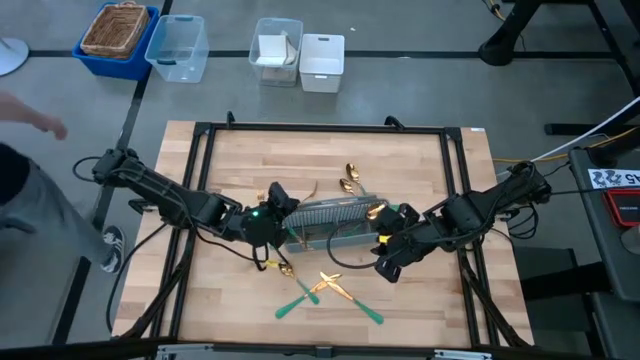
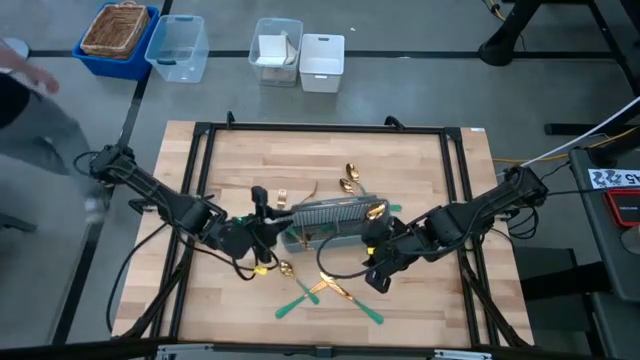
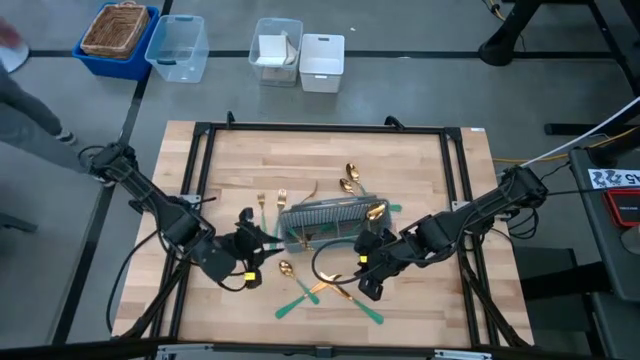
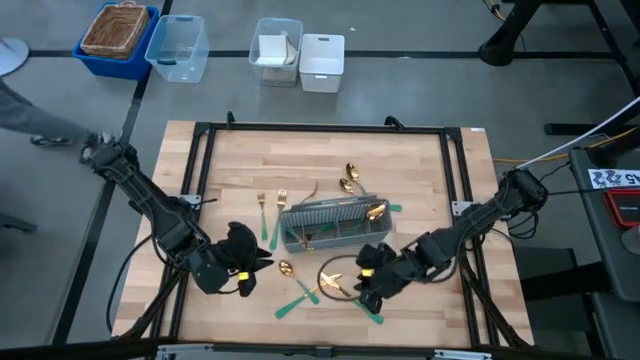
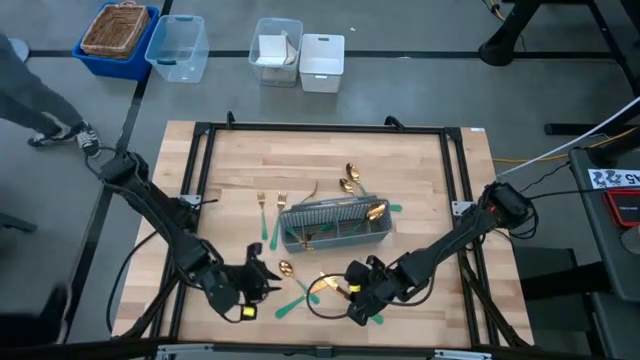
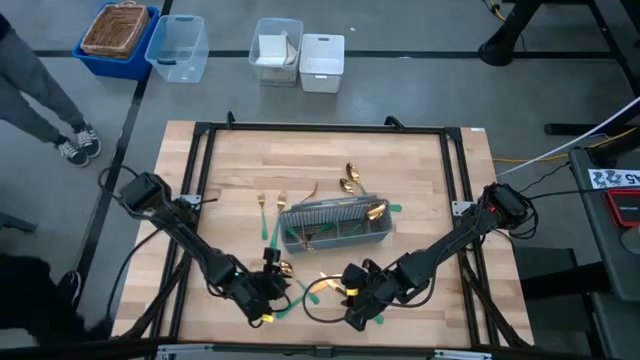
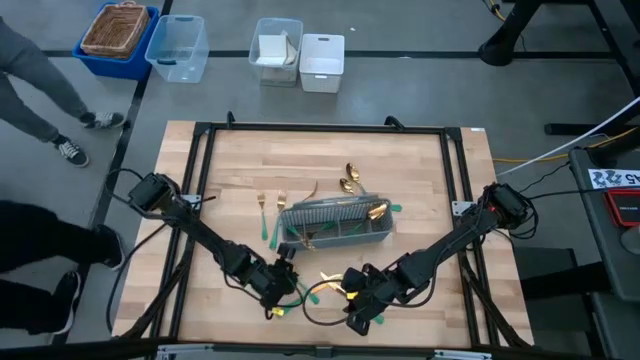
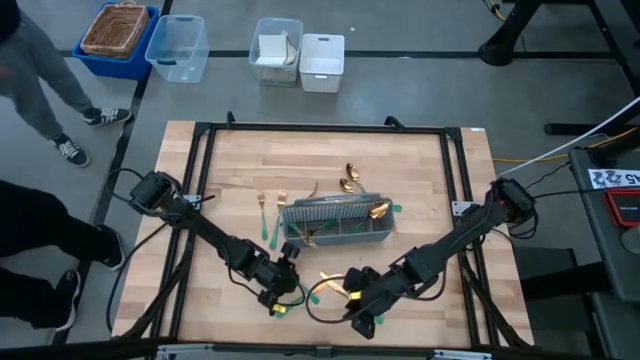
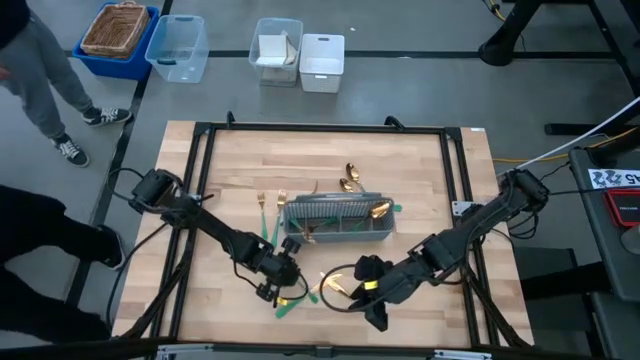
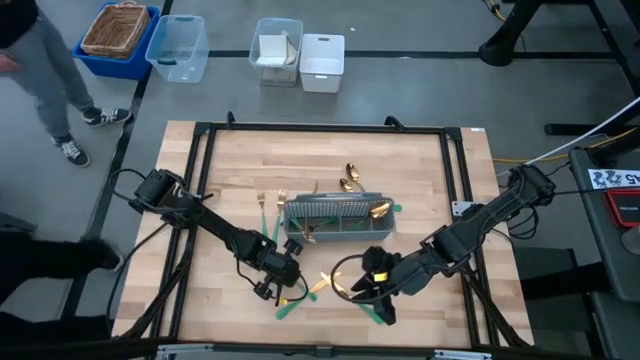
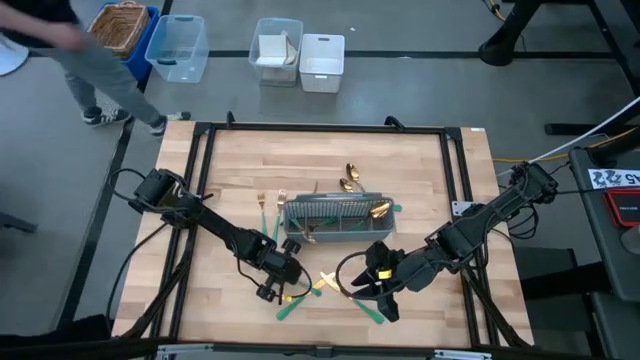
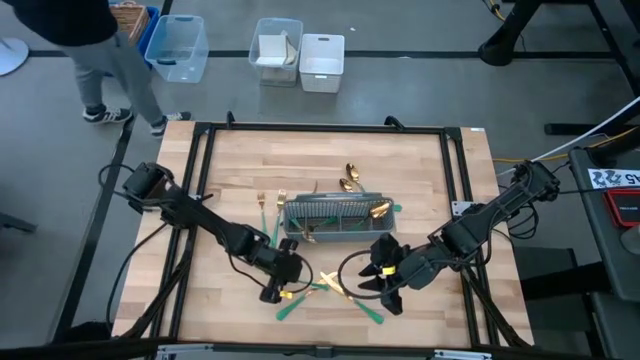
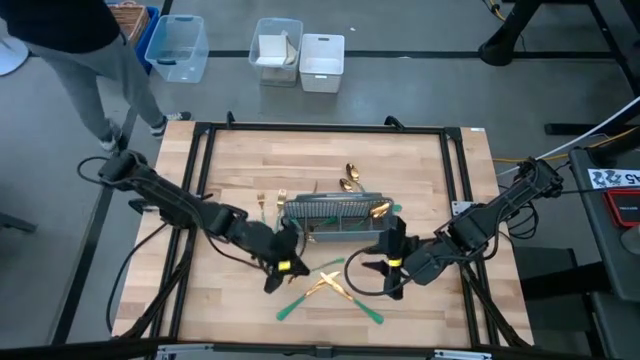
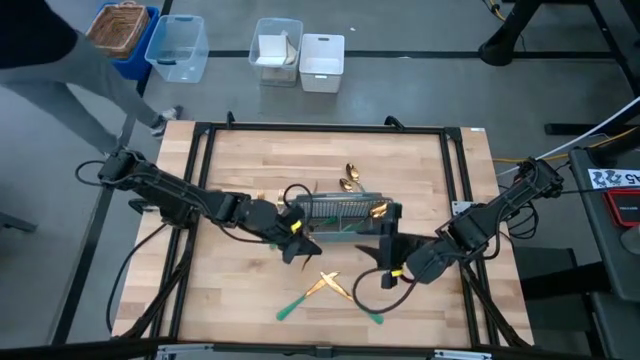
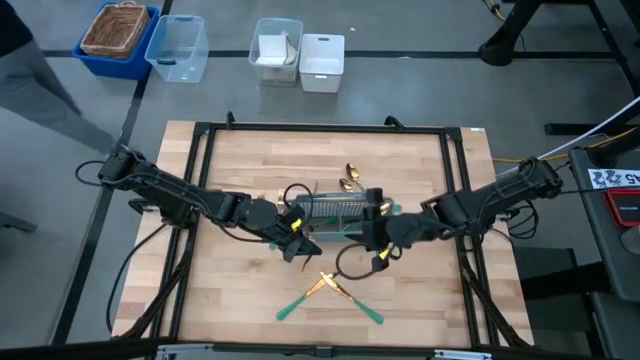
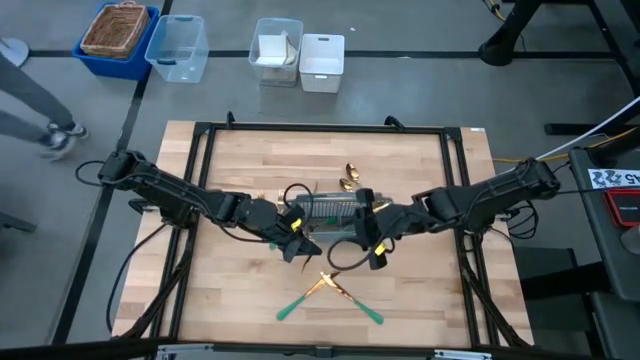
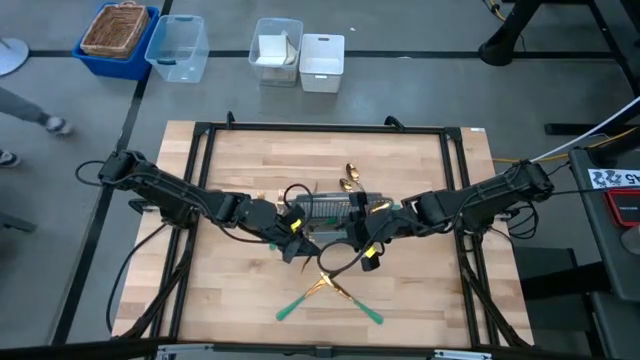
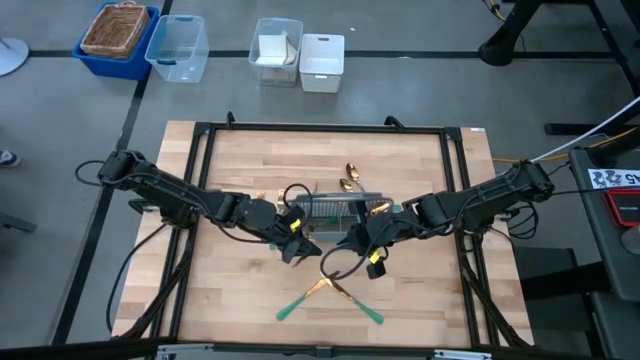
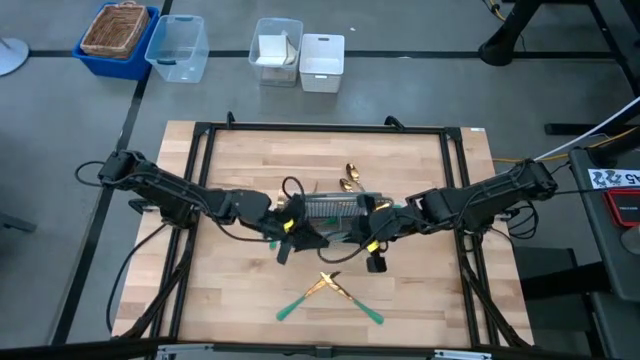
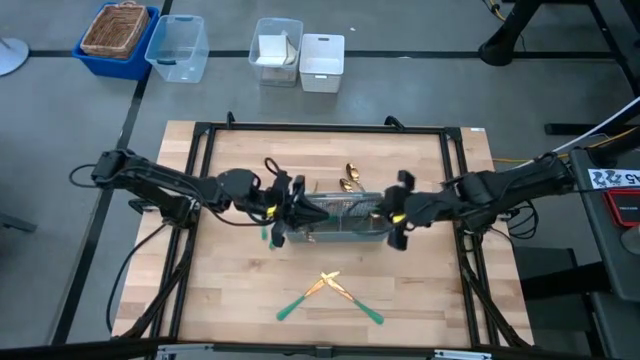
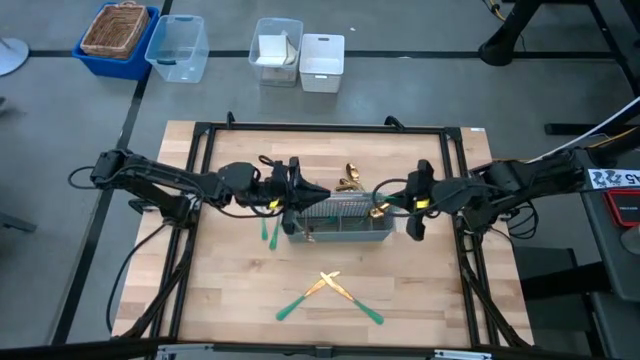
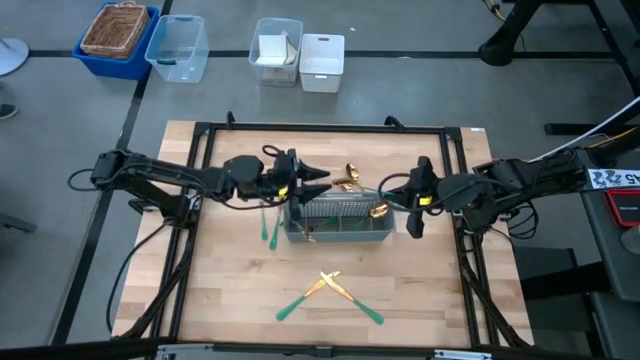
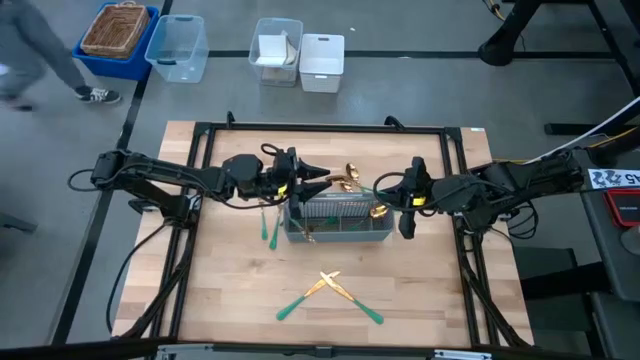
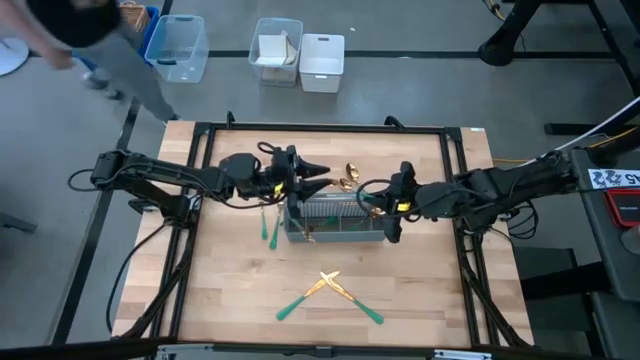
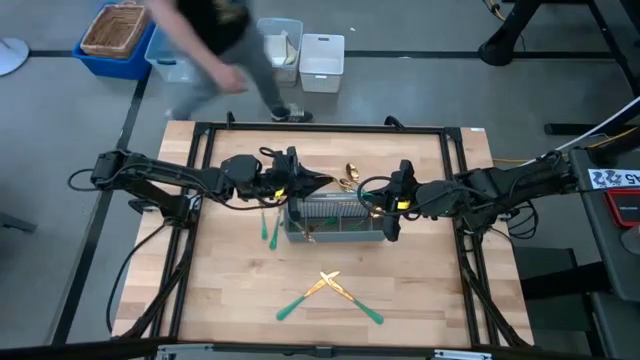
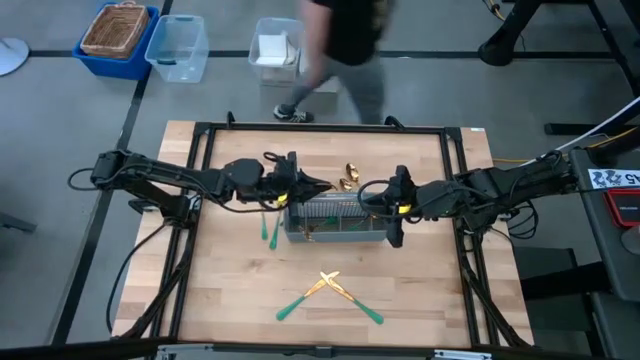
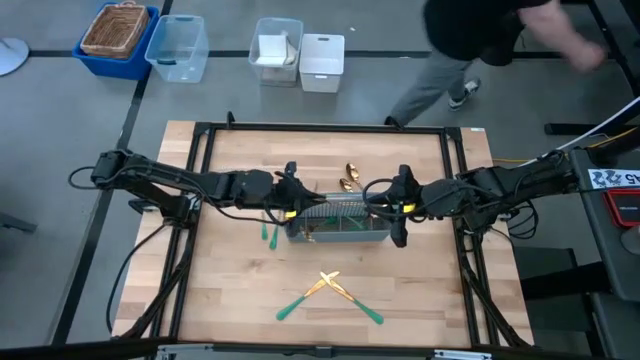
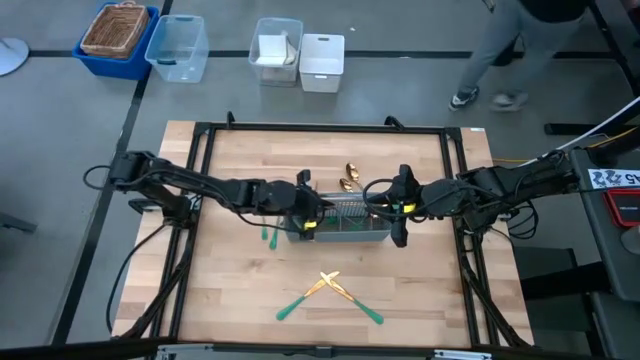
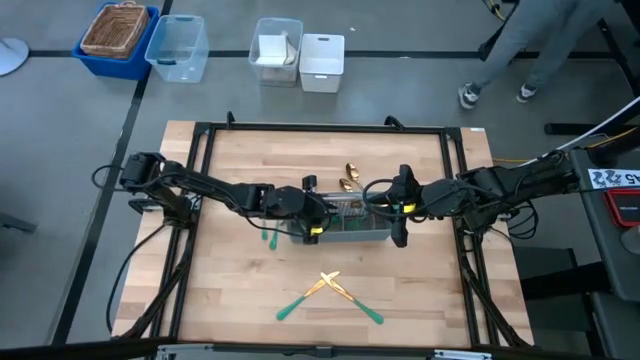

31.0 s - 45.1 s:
Task: Sort silverware
Put the green spoon into the gray utensil holder

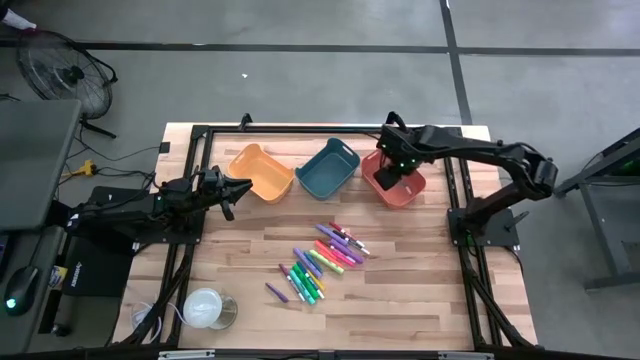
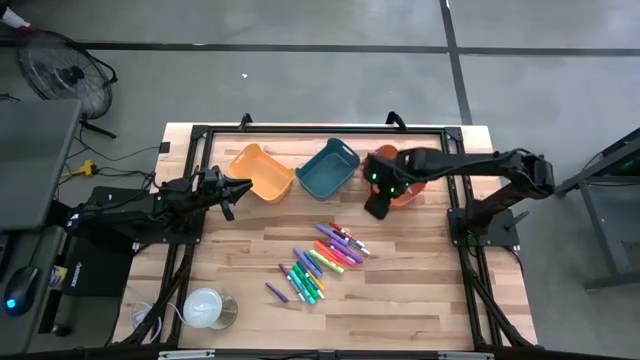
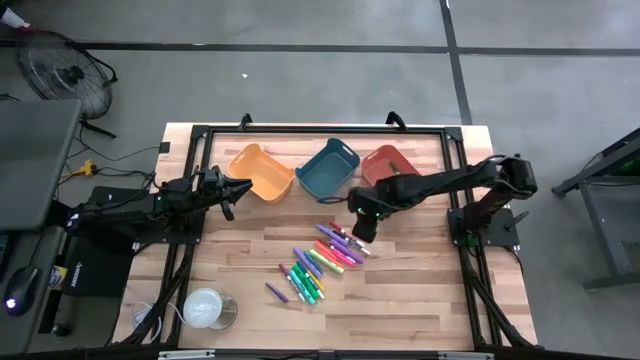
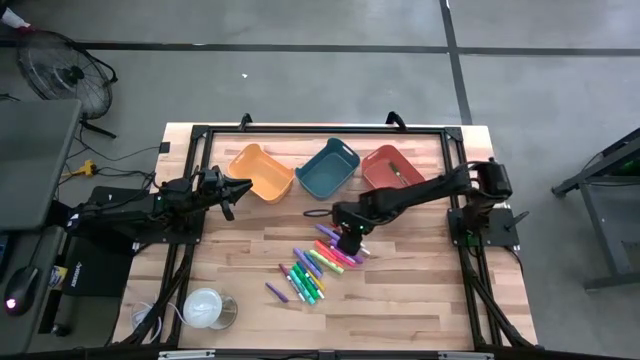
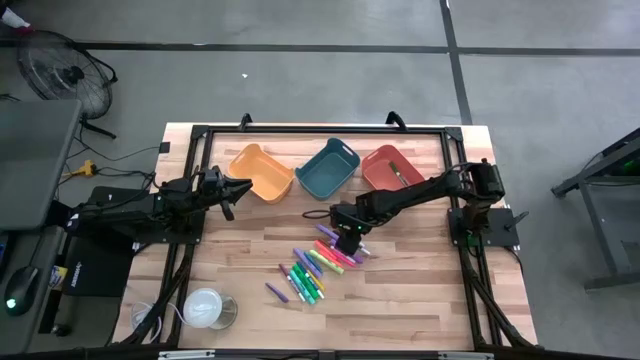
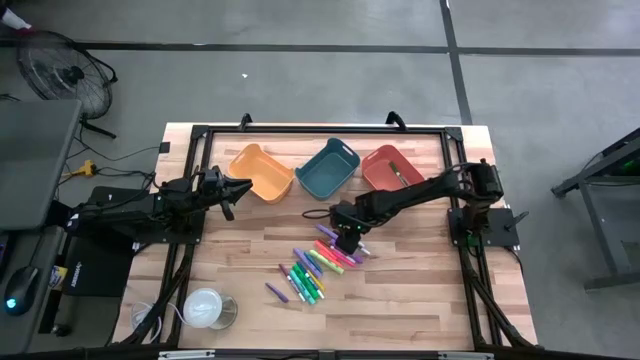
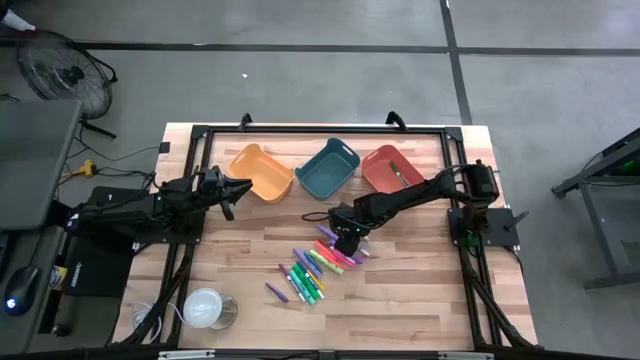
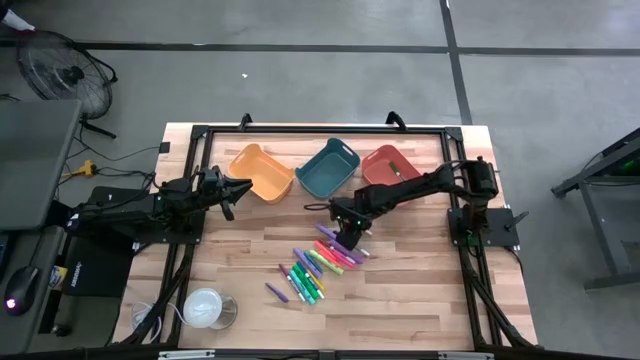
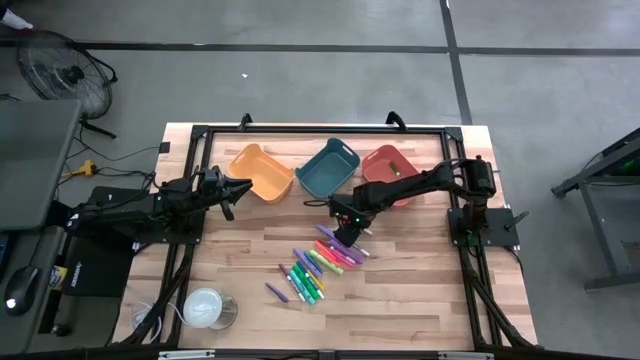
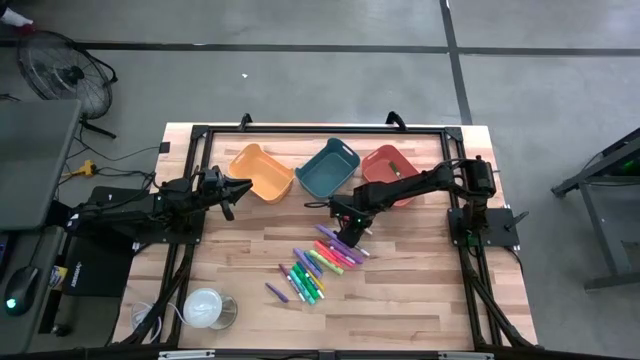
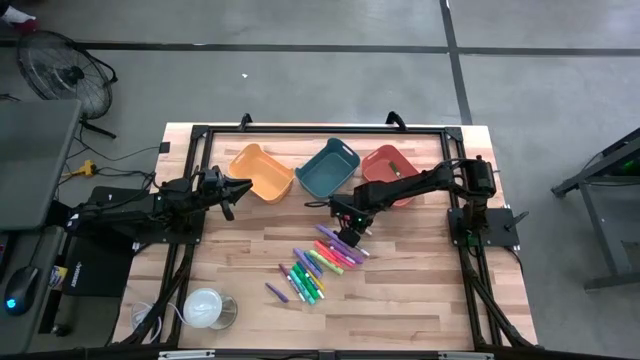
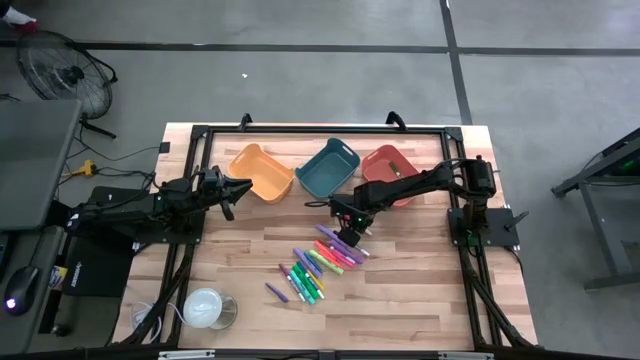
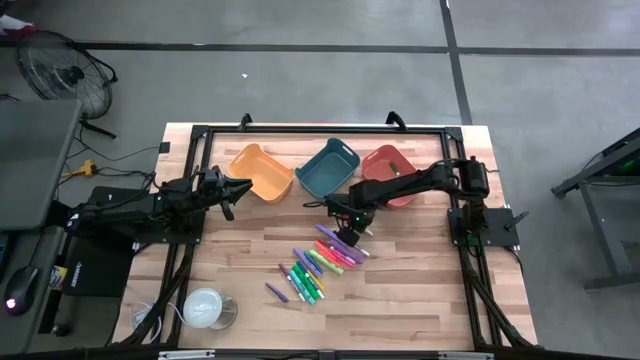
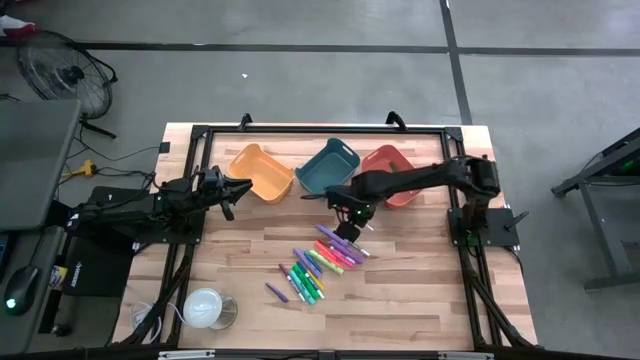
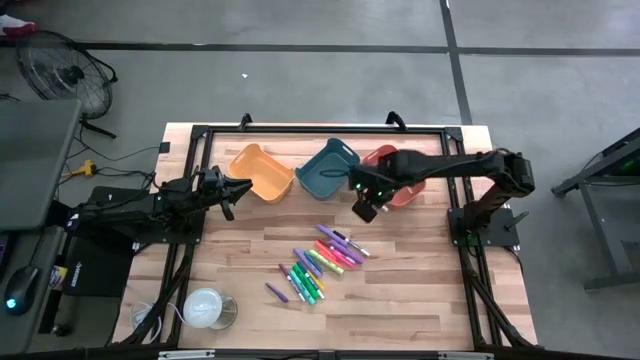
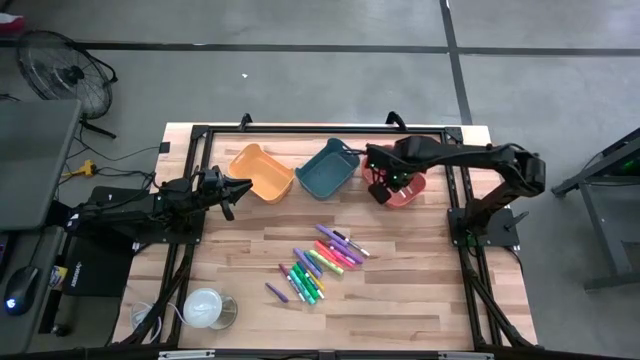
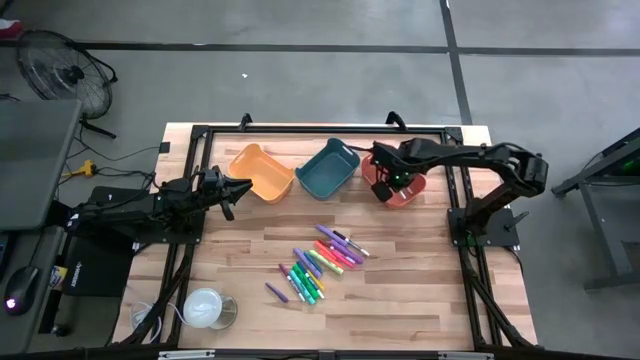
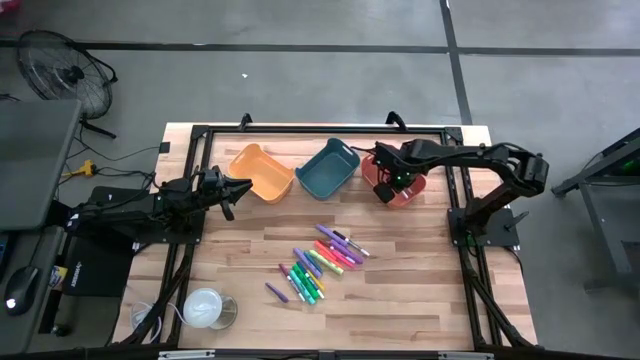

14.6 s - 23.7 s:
Task: Pick & Place Markers
Put the red marker pen into the orange bin
